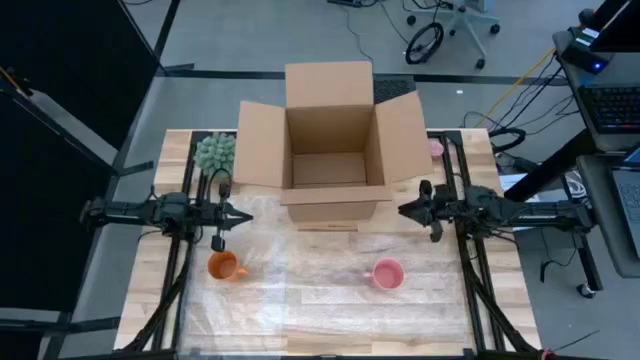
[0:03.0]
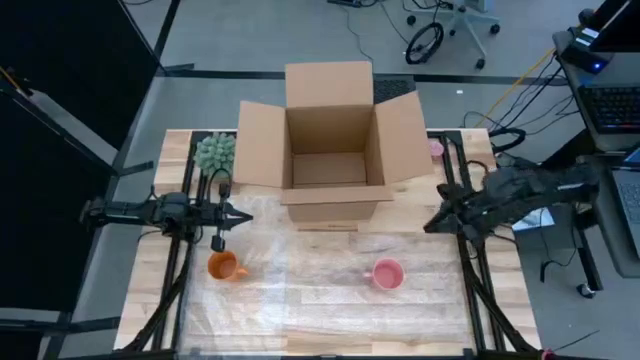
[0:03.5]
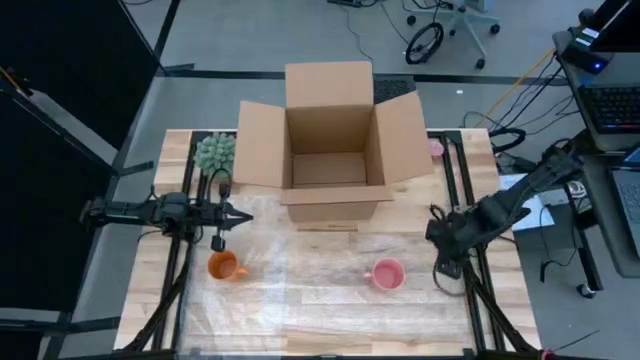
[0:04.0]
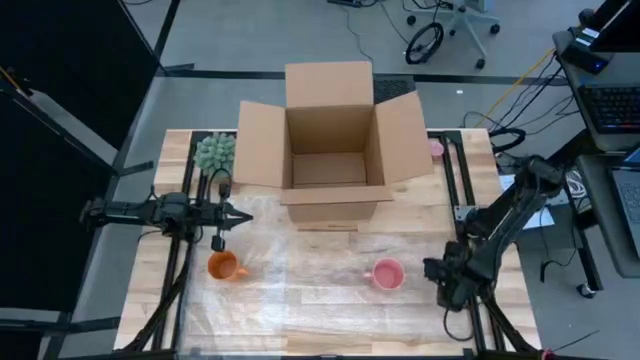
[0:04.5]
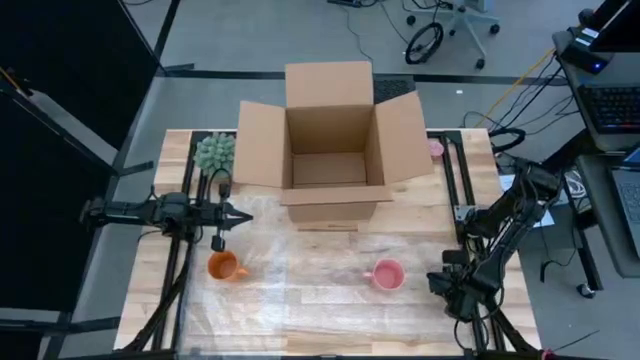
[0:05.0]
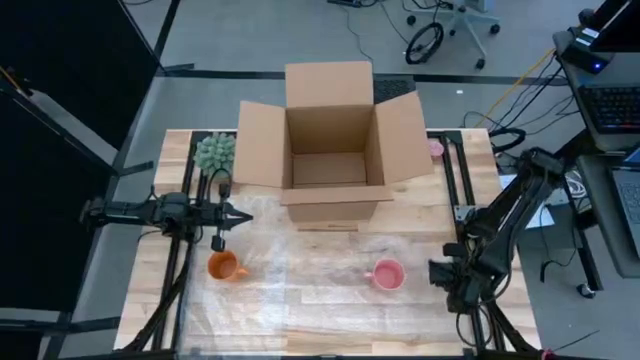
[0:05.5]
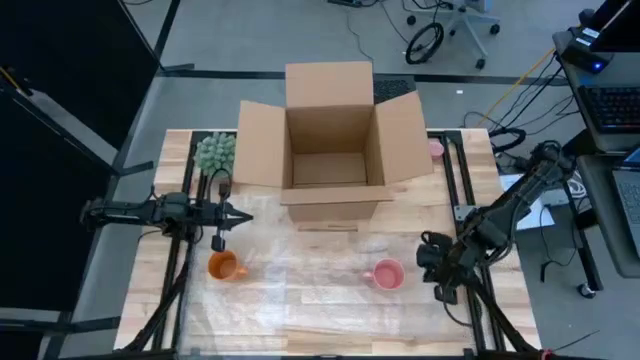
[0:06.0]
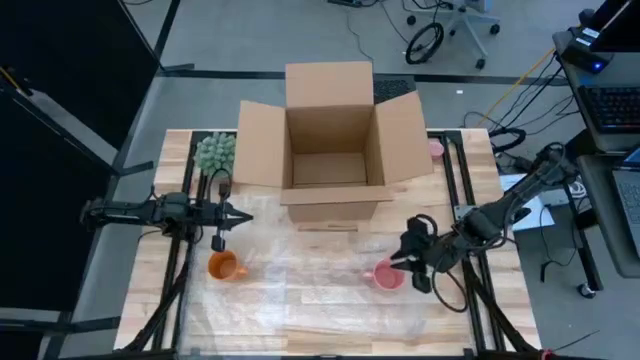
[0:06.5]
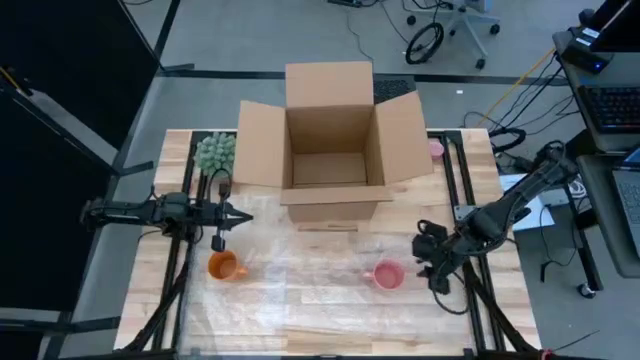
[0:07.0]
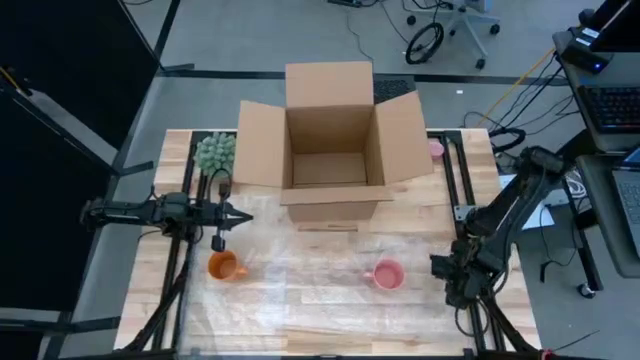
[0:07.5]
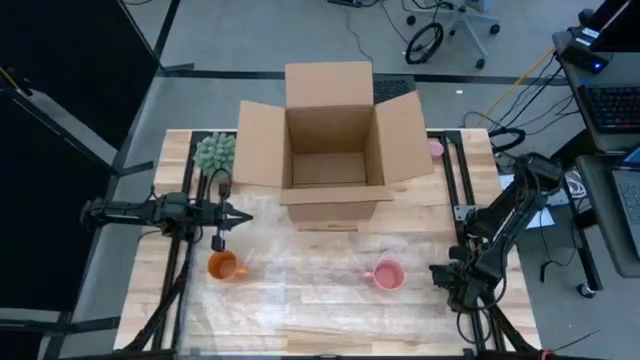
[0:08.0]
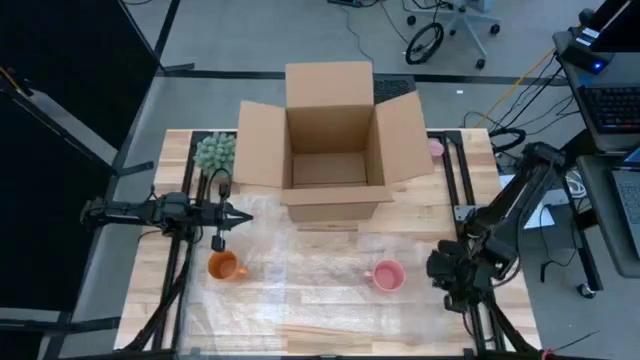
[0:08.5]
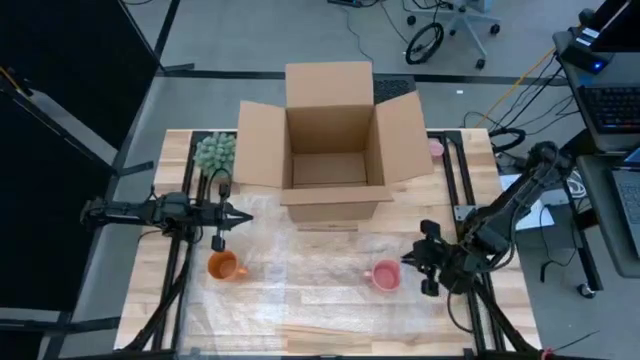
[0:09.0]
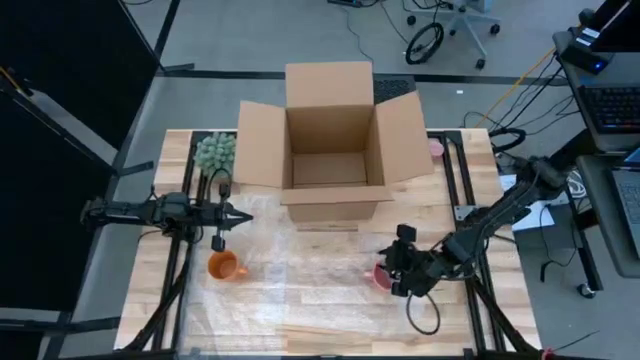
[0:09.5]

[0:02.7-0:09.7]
Task: wrap mug
Wrap the pink mug with bubble wrap

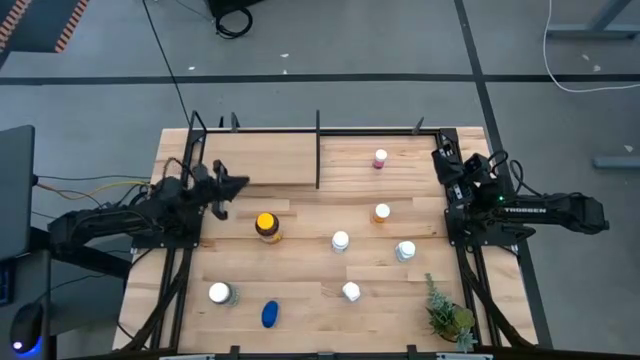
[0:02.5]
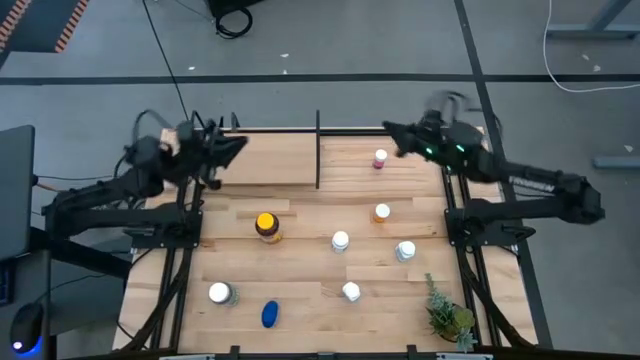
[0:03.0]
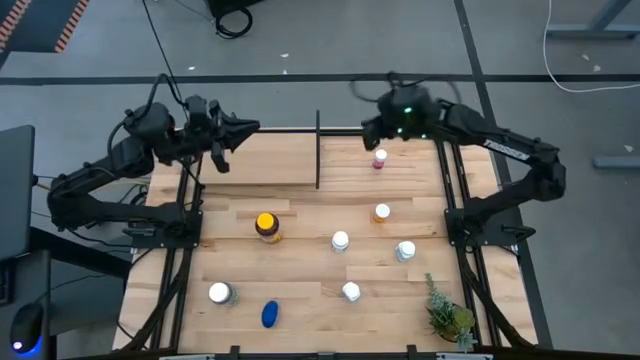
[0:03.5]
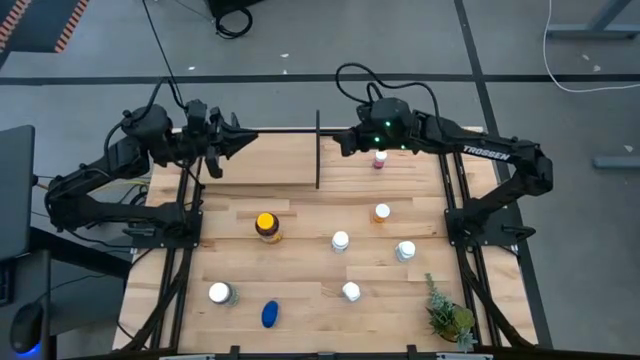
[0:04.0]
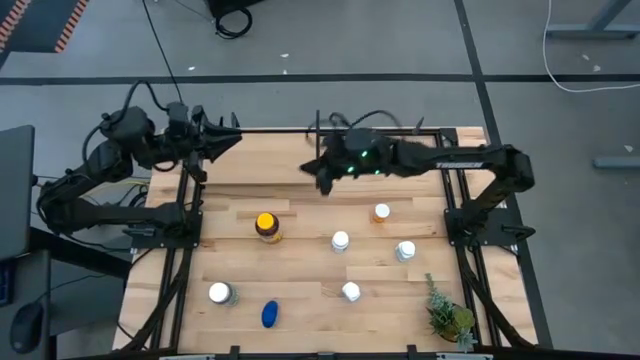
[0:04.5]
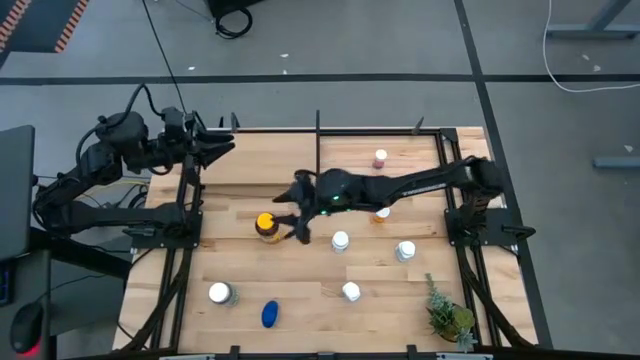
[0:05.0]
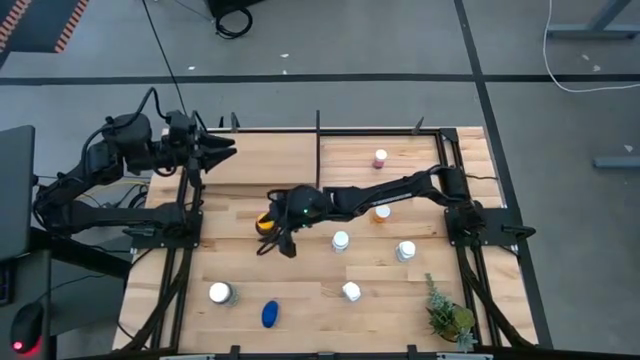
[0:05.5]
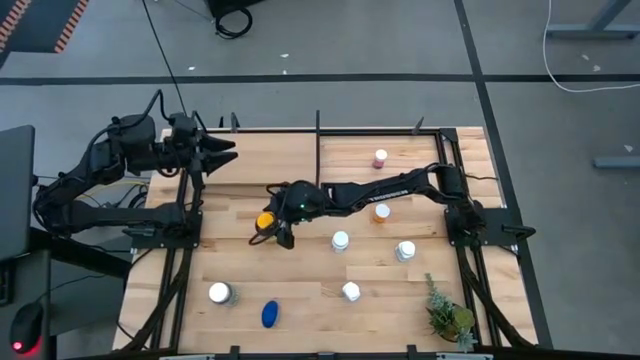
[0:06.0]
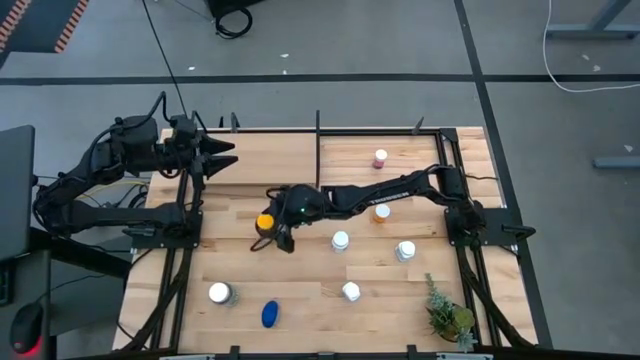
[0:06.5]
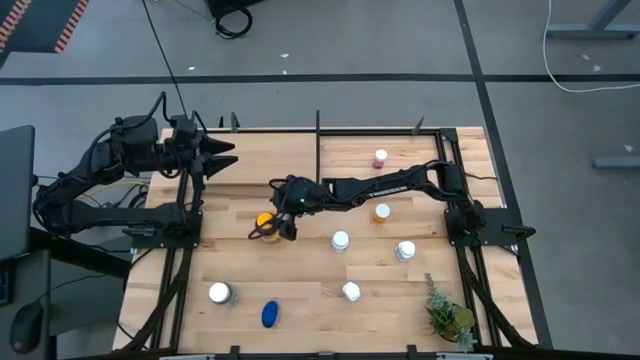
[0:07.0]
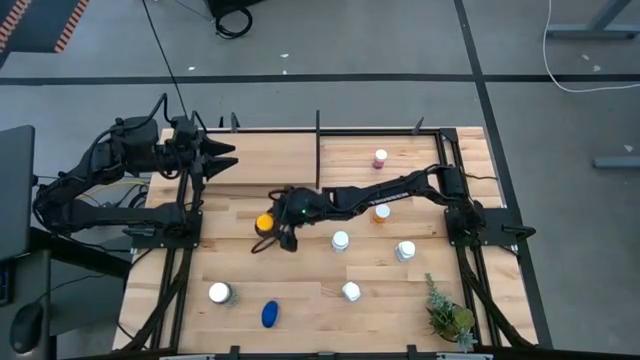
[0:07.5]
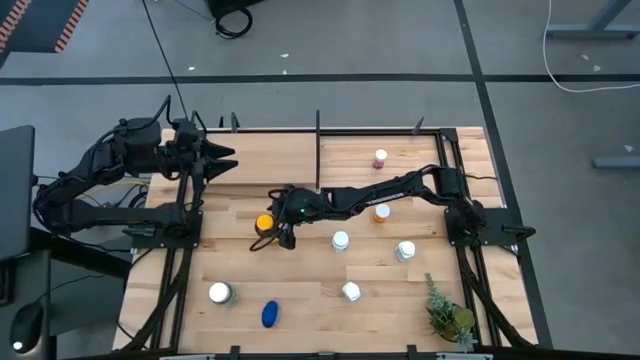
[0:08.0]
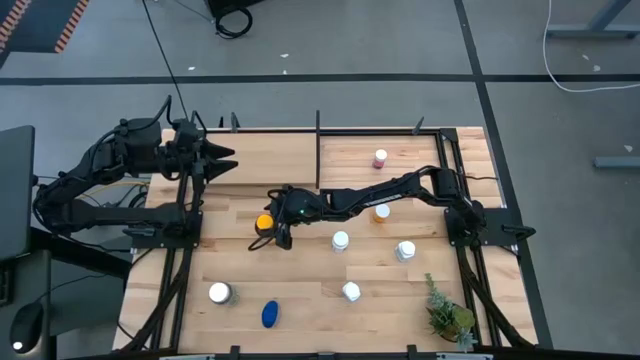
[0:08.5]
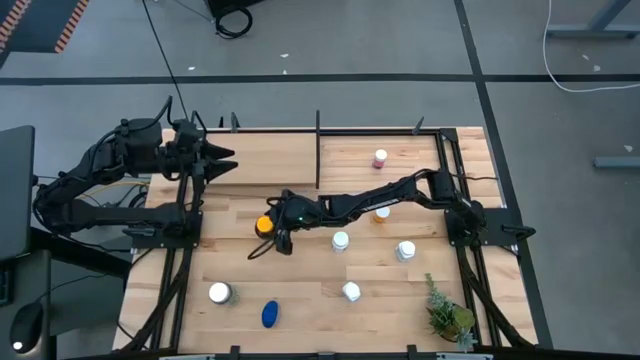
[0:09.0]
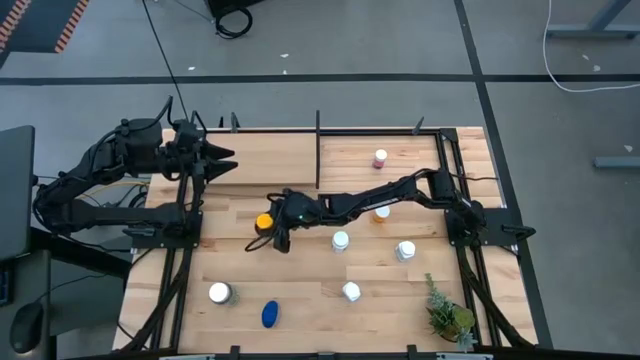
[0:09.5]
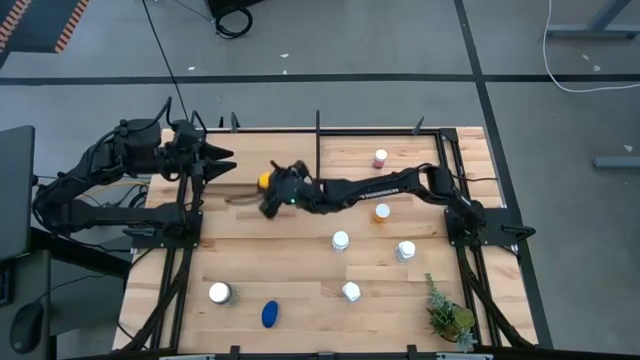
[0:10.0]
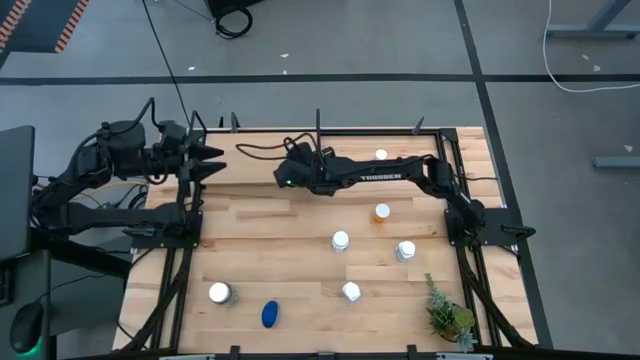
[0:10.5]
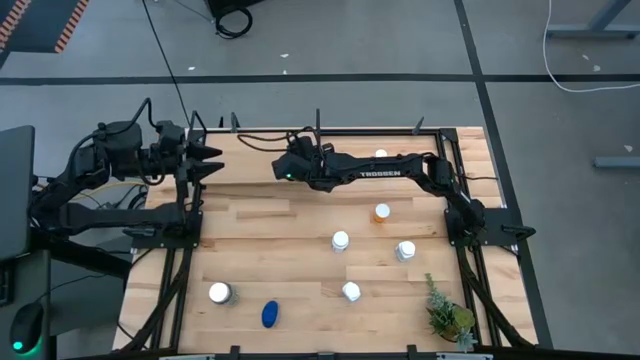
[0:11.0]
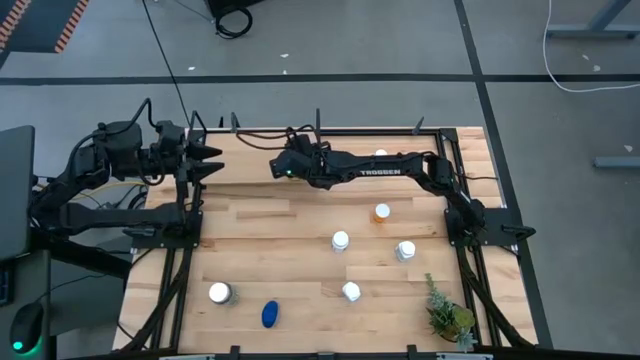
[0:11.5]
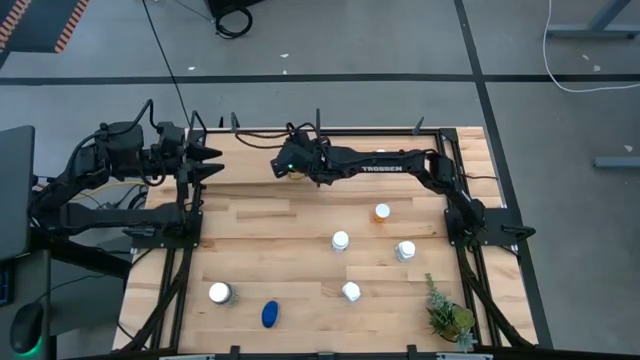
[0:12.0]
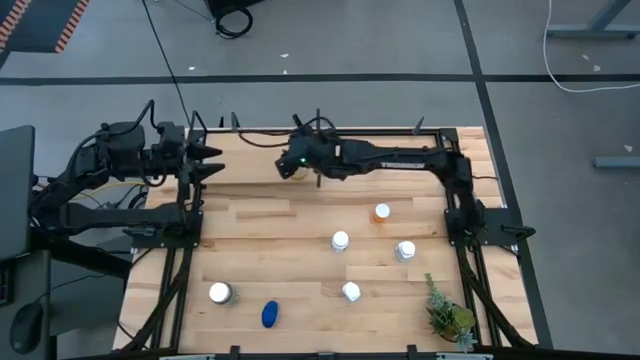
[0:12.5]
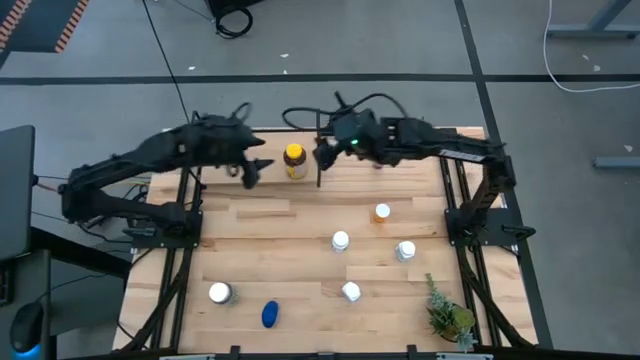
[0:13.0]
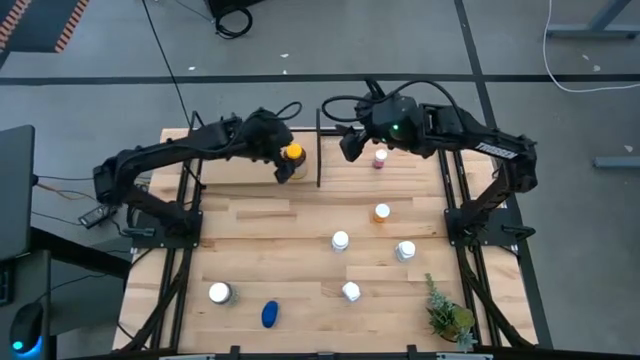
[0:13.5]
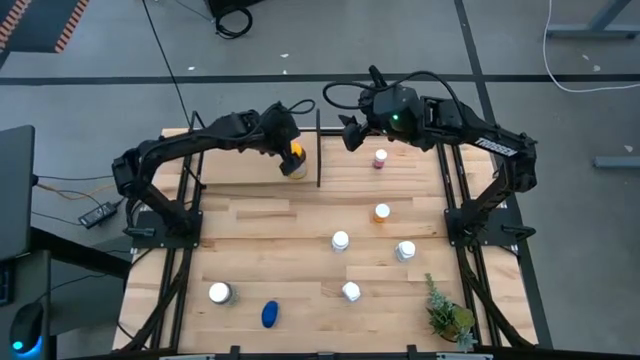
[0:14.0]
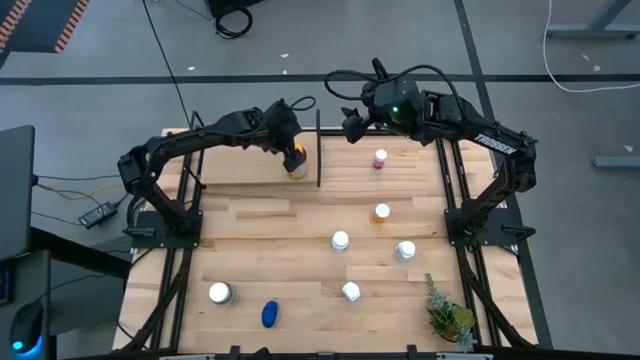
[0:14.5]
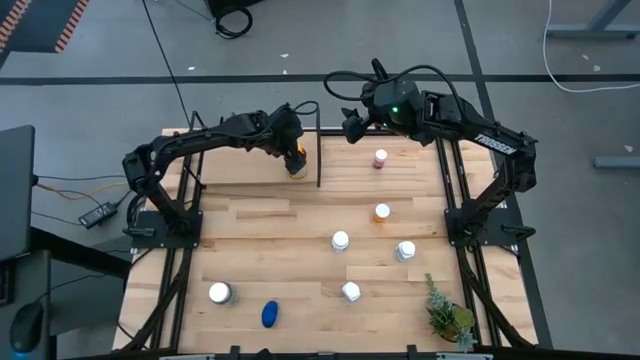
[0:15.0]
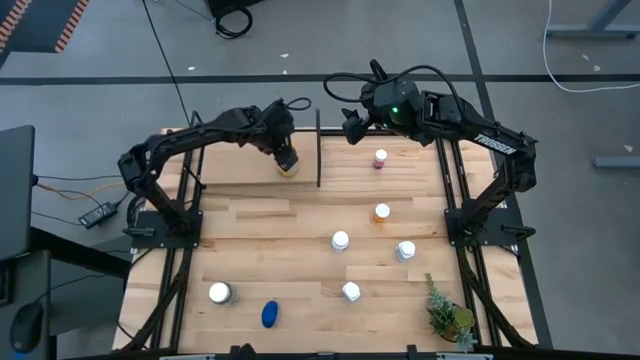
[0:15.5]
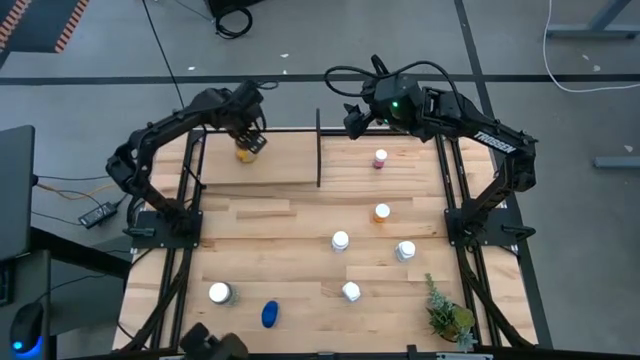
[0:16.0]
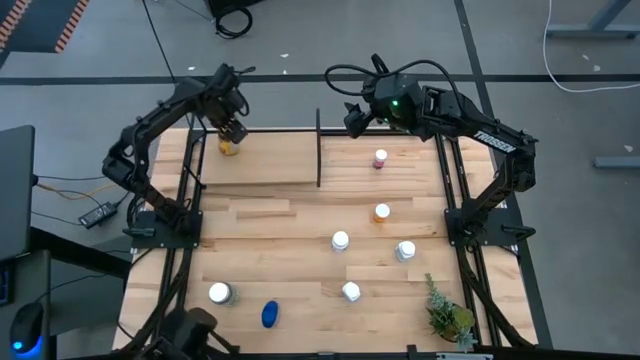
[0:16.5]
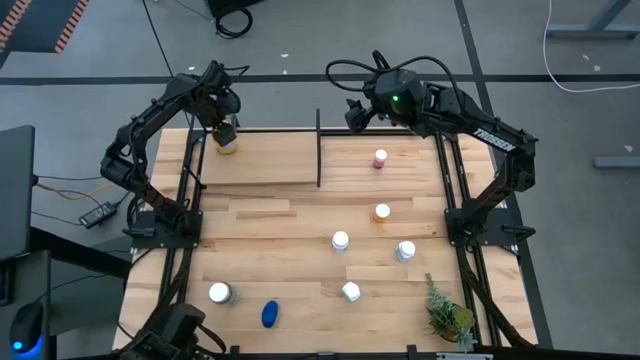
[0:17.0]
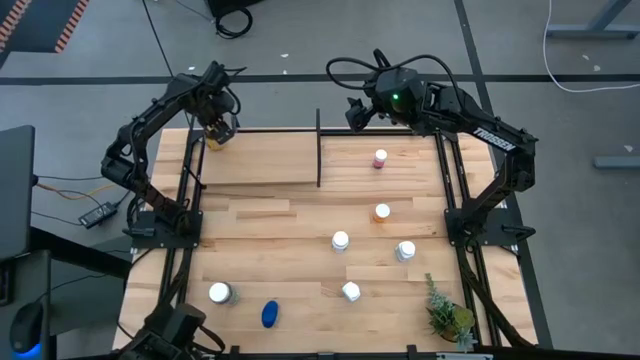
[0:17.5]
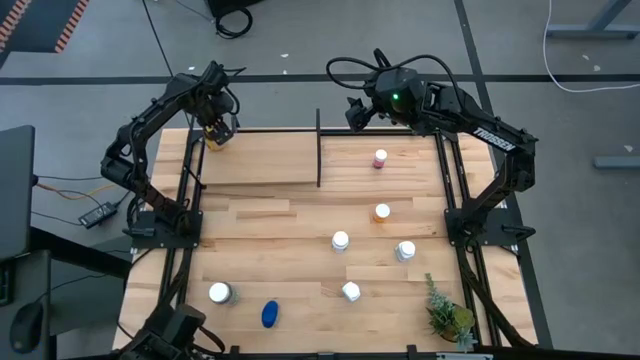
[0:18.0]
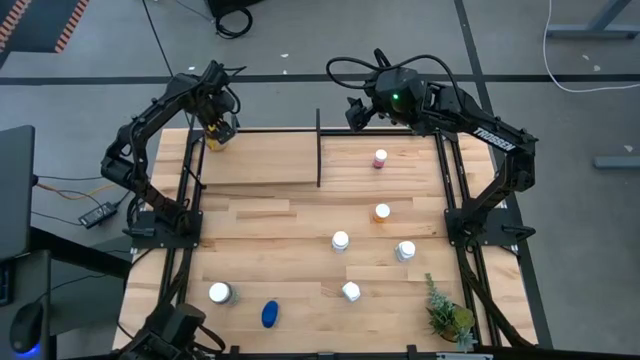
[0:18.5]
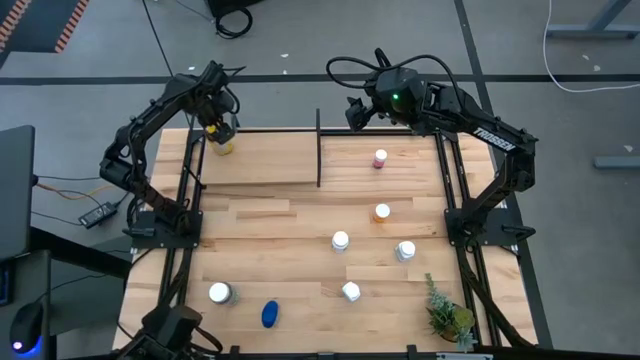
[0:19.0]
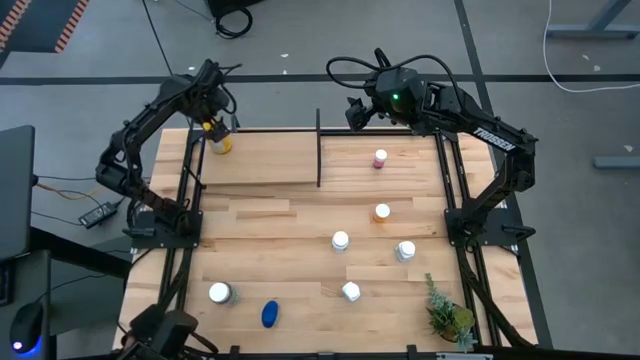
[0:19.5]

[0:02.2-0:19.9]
Task: Pick and place medicine bottles onto shelf by color
Put the yellow medicine bottle on the shelf
